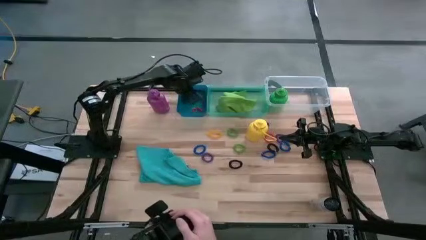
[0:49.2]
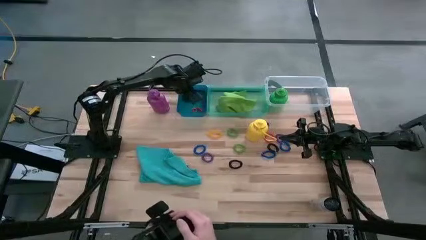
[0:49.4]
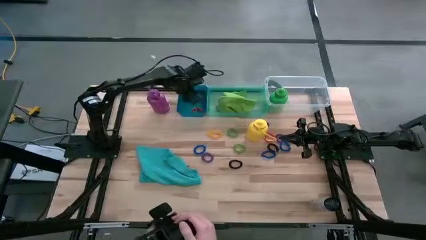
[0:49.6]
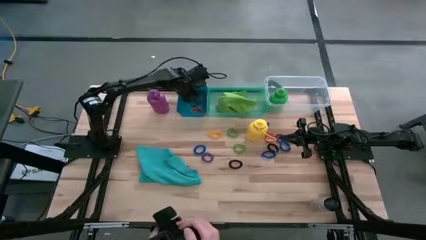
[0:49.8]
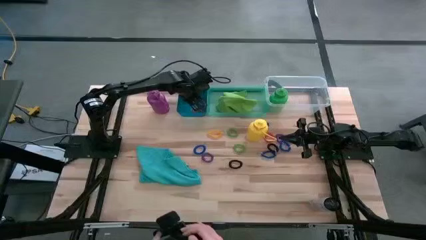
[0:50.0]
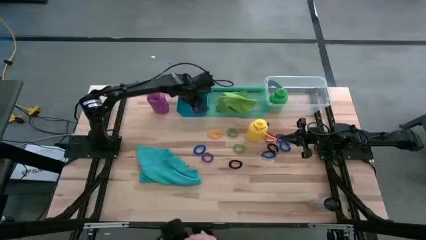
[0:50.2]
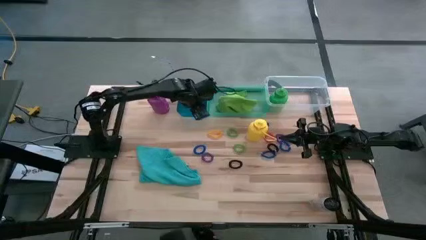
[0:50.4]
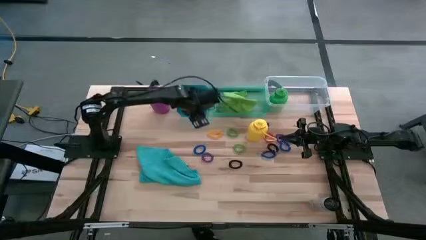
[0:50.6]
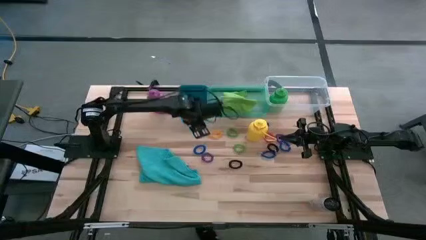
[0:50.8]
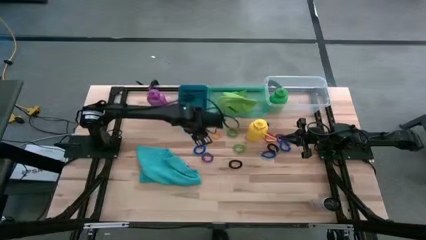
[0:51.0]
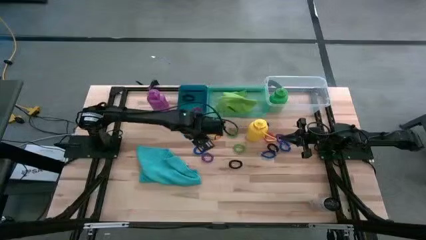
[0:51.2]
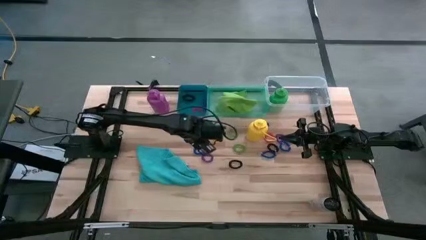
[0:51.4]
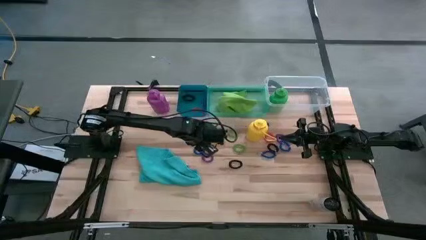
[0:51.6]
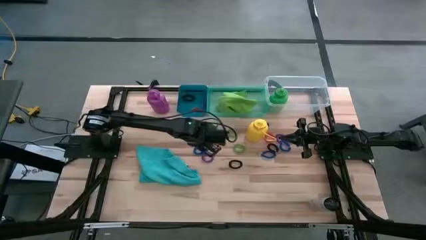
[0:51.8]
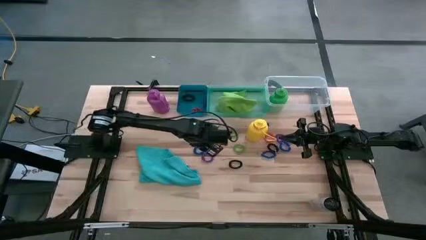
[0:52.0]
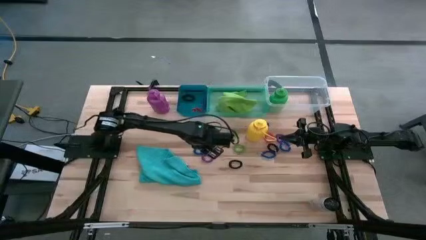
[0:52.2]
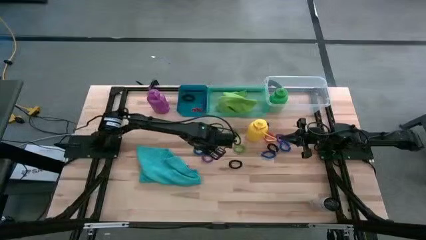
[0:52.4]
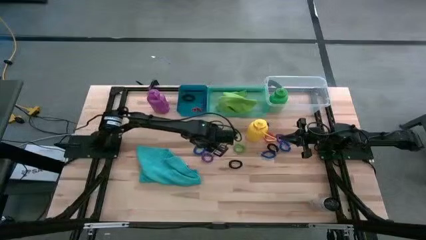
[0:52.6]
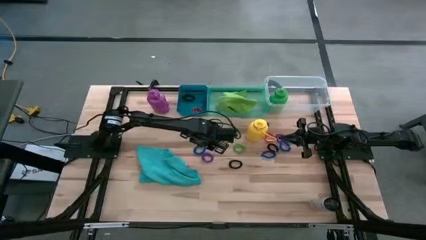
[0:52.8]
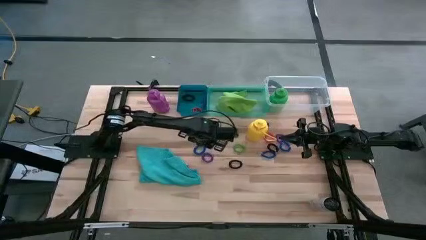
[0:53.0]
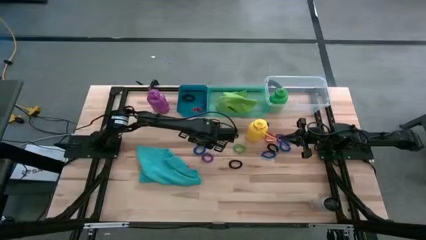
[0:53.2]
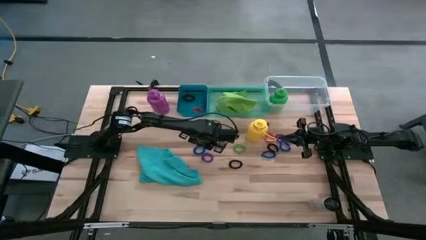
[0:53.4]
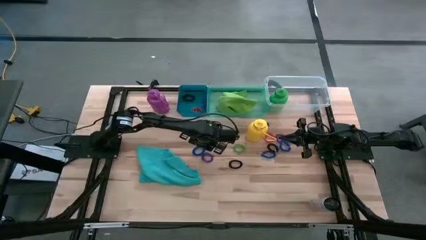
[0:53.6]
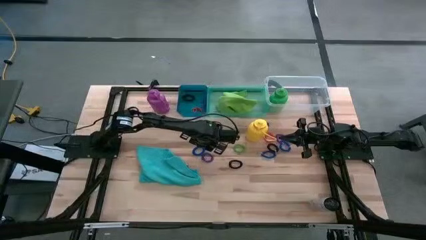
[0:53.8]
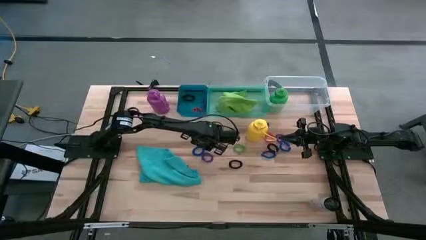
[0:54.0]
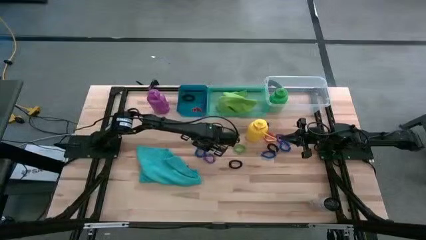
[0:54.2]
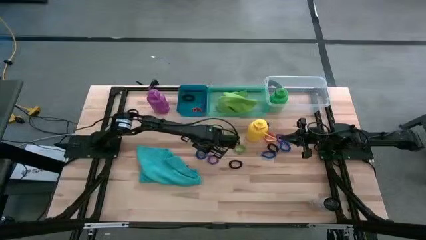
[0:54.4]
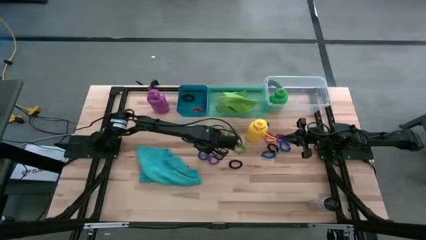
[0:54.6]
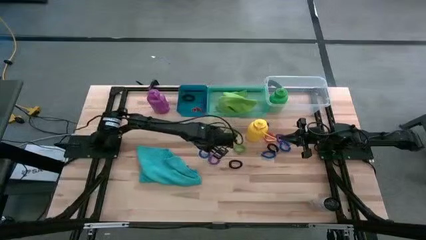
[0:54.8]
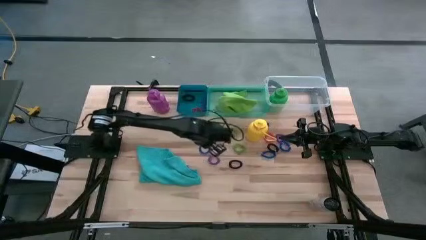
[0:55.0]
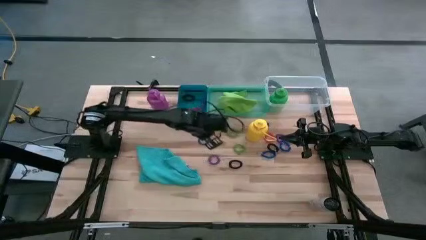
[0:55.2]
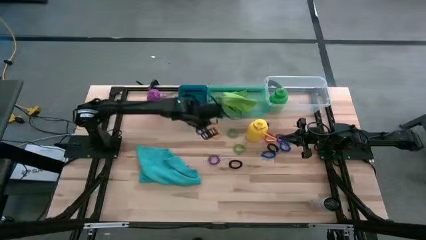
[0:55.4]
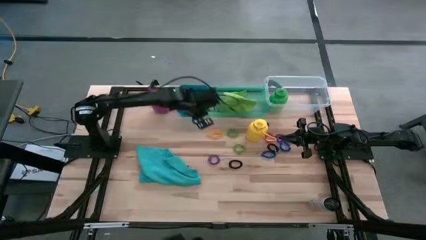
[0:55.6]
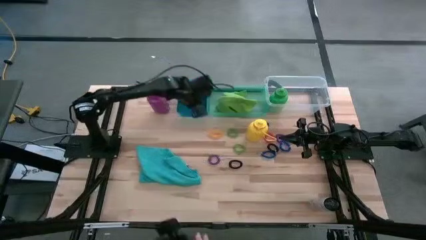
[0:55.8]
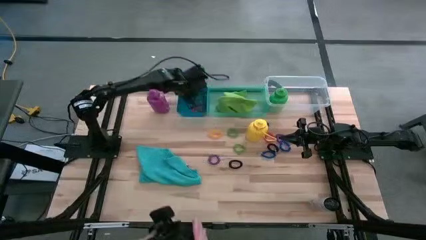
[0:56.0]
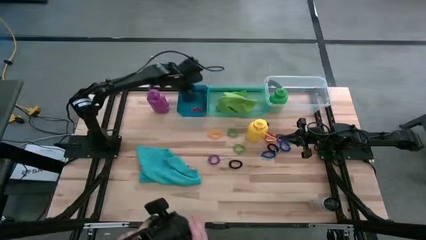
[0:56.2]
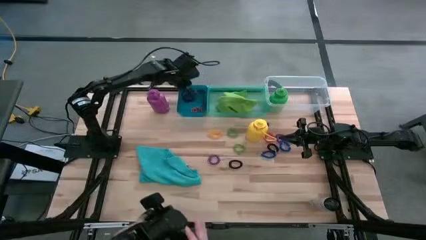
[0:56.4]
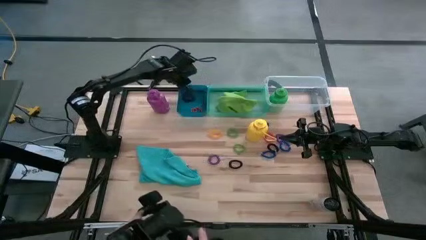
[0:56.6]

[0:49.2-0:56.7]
Task: Pick & Place Sports Items
Put the left blue spring keychain into the blue bin

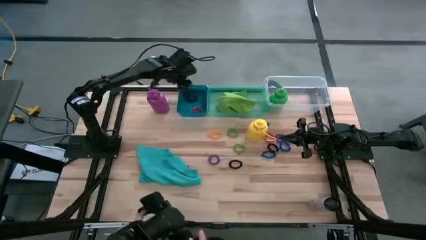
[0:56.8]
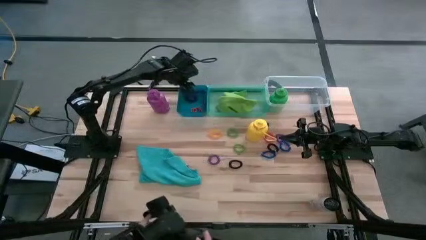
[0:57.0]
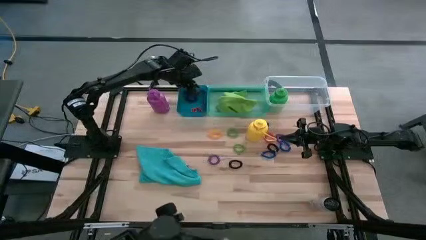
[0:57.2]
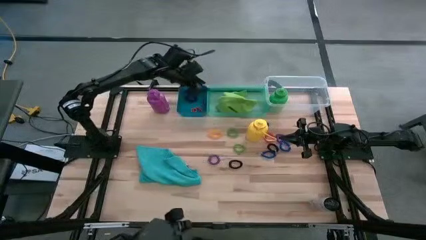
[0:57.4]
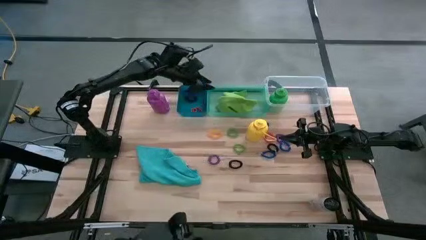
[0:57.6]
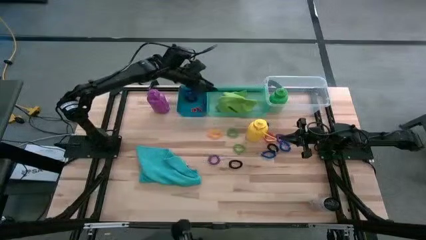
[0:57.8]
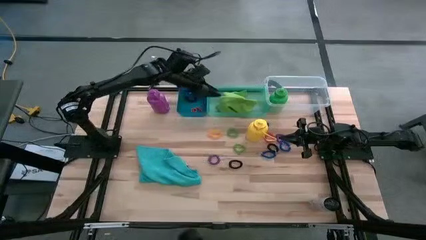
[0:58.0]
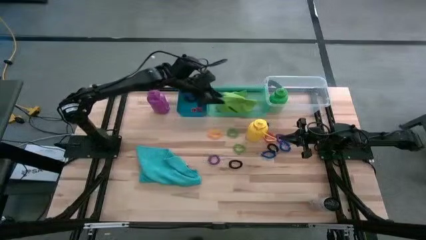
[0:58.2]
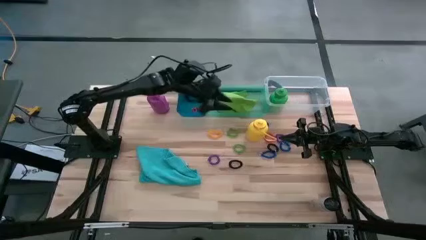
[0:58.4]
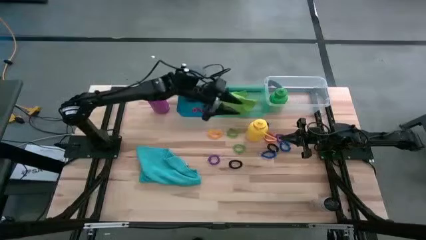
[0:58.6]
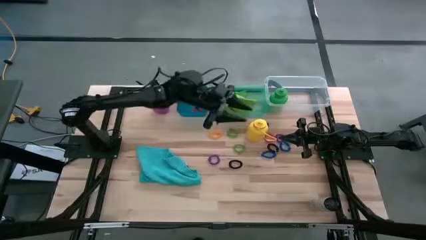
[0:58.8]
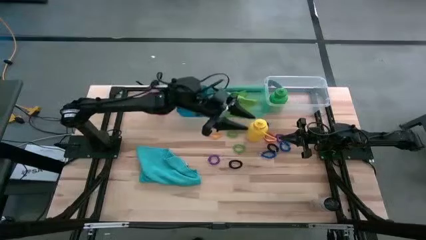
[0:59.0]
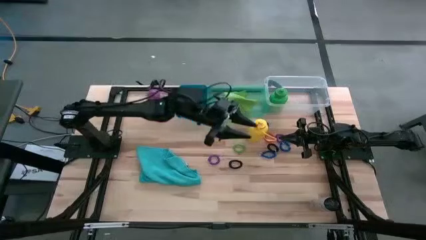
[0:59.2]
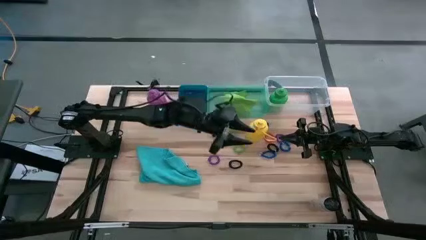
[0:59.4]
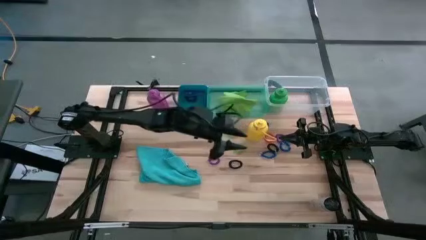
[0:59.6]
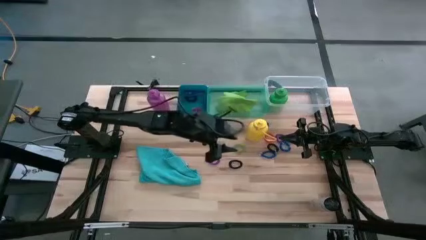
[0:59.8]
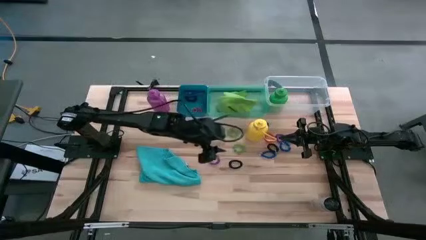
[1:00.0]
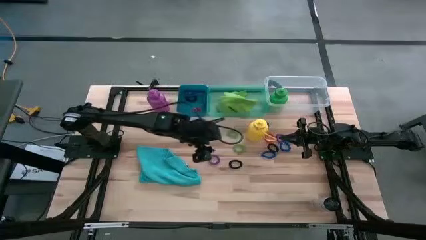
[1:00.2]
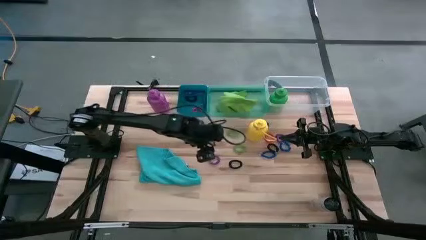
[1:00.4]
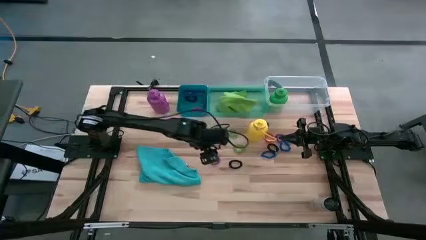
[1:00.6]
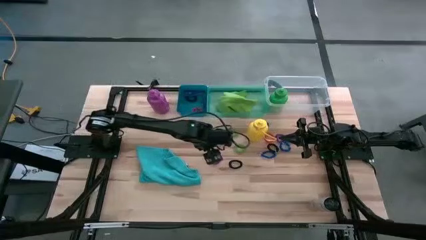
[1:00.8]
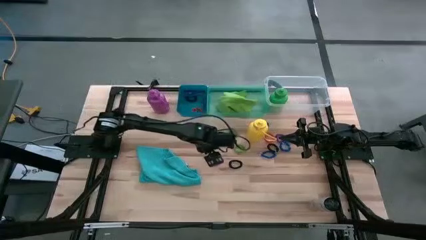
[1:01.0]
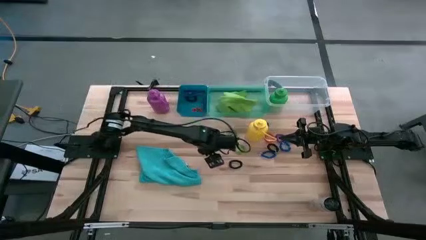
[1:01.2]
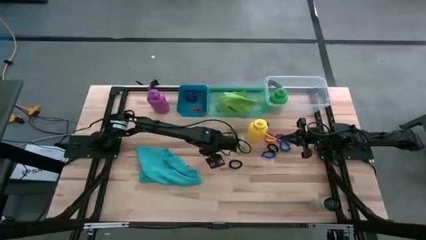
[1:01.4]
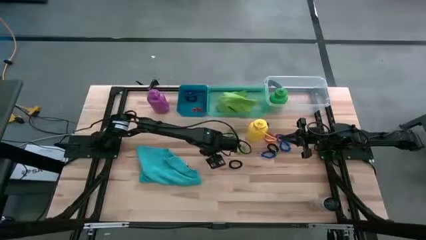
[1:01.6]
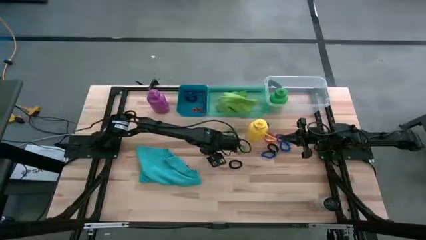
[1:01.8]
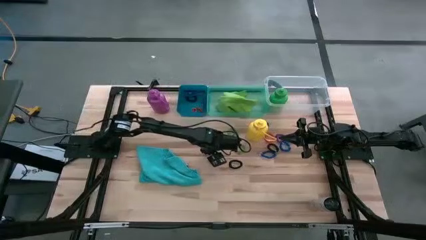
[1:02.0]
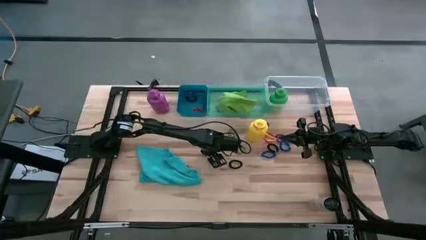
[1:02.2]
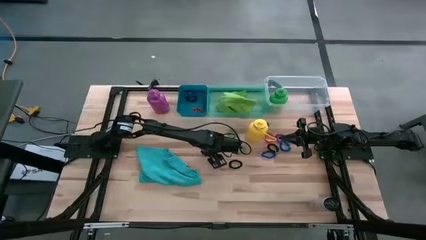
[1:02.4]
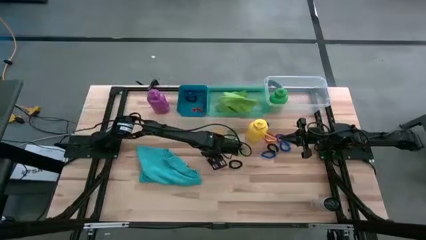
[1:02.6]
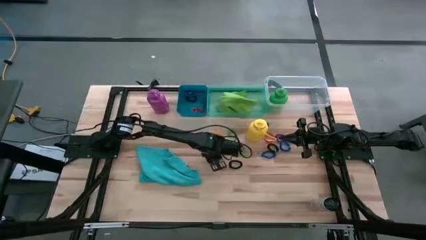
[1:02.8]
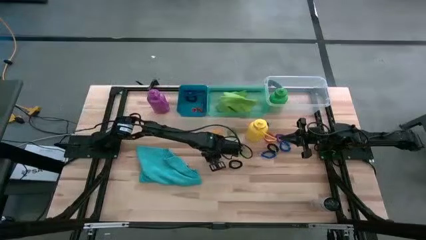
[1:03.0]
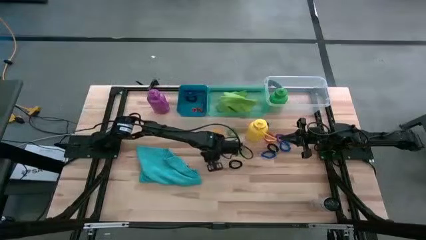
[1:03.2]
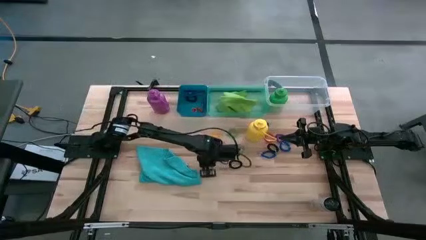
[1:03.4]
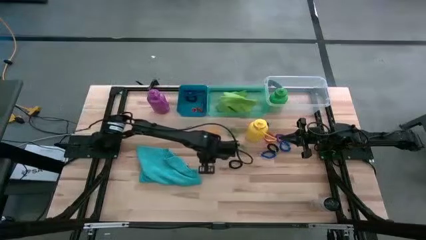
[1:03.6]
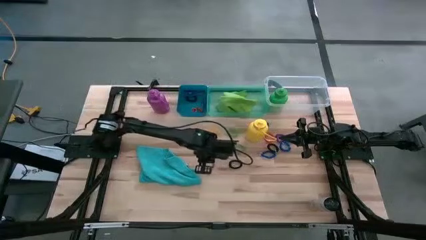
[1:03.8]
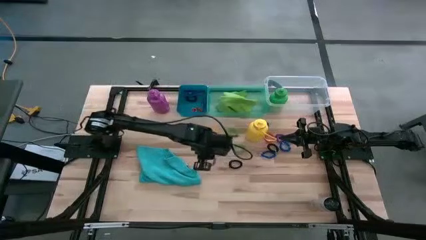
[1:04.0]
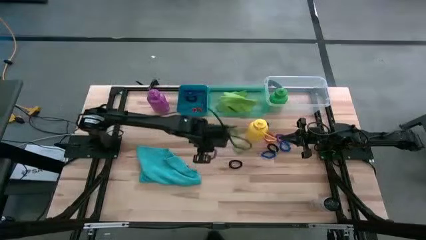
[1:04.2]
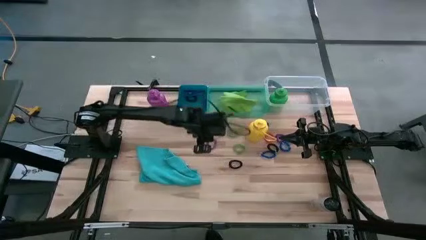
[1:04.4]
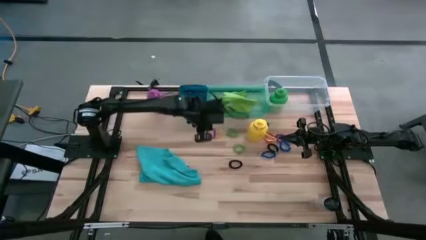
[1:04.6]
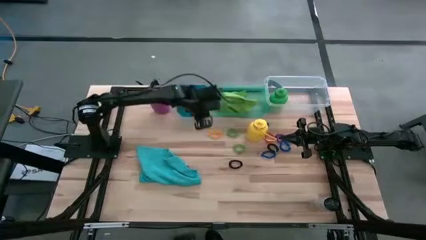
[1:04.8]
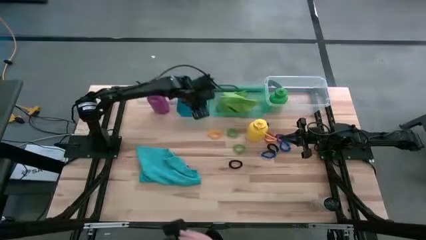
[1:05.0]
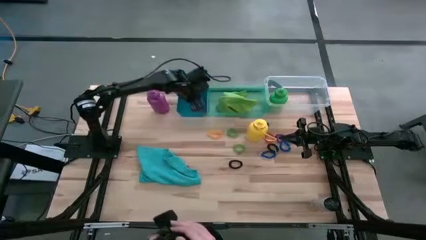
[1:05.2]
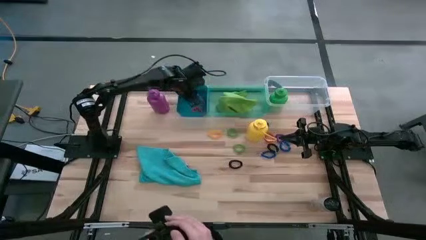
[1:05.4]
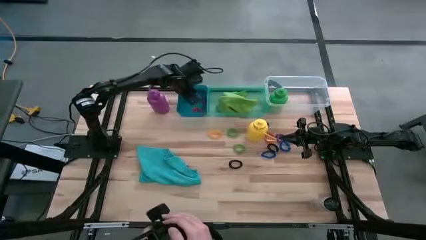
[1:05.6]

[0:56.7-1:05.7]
Put the left violet spring keychain into the blue bin
